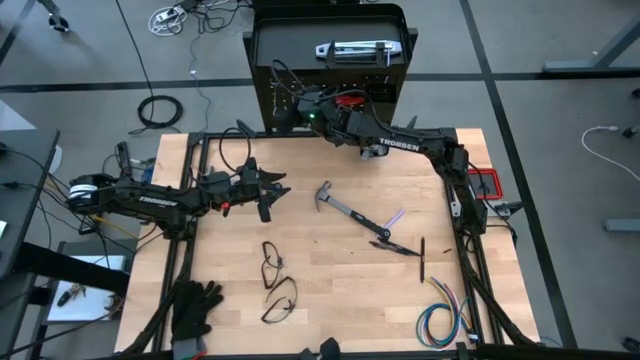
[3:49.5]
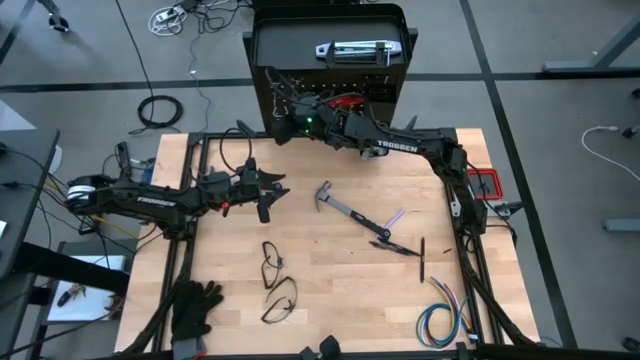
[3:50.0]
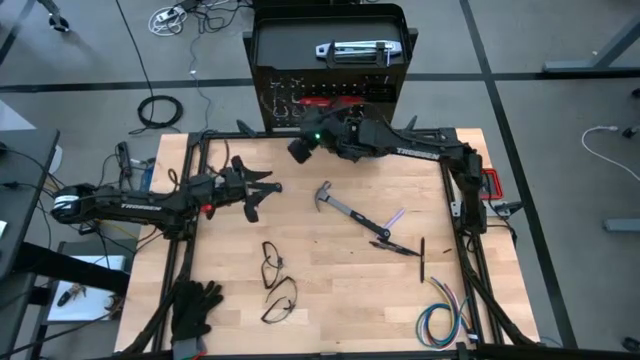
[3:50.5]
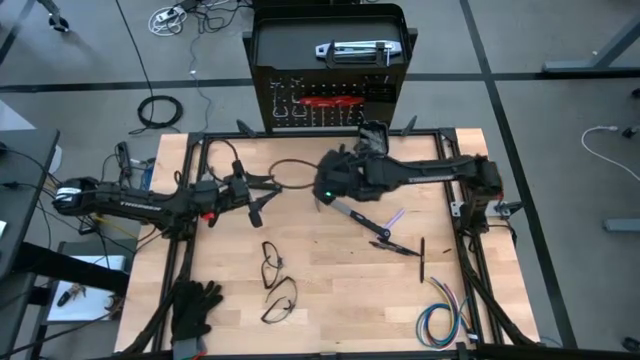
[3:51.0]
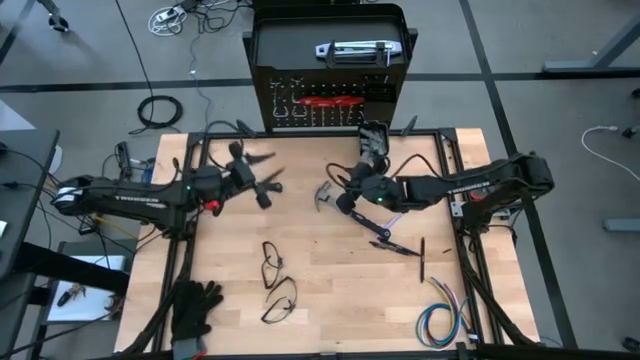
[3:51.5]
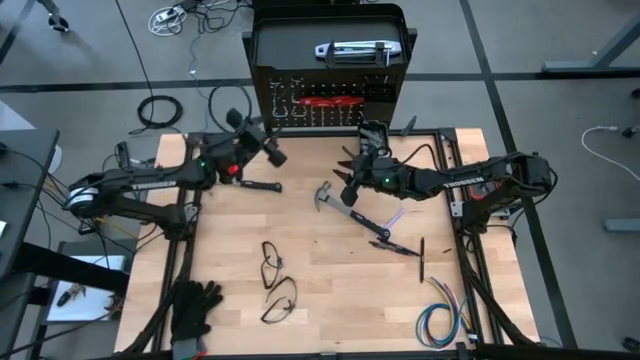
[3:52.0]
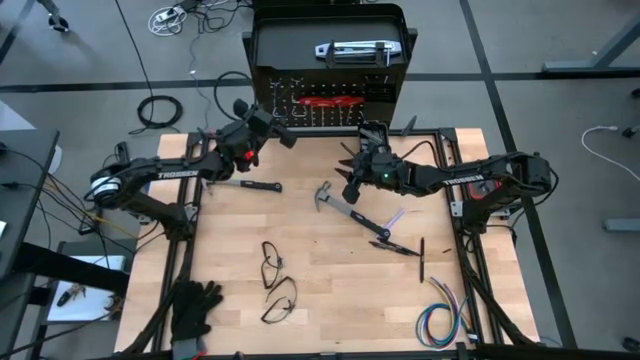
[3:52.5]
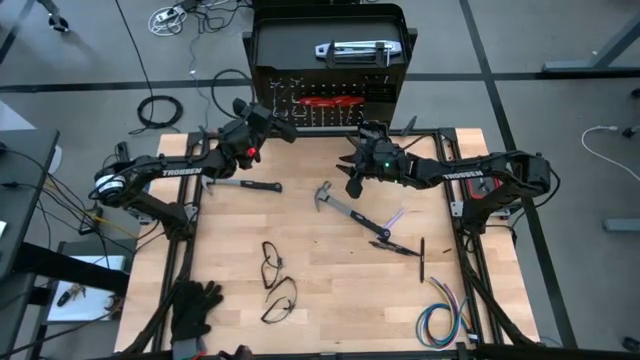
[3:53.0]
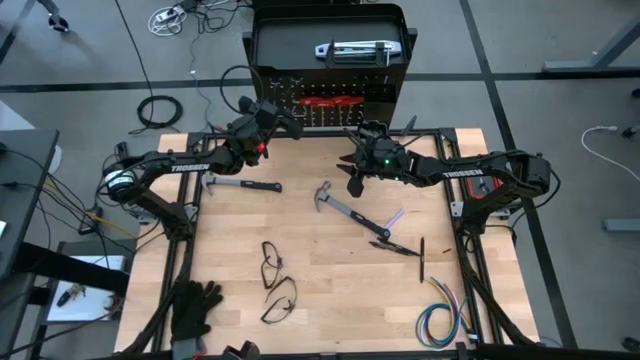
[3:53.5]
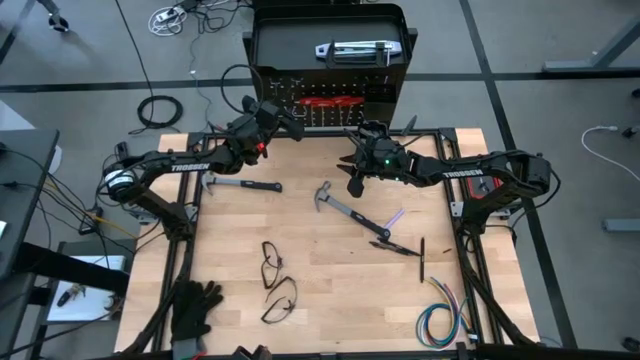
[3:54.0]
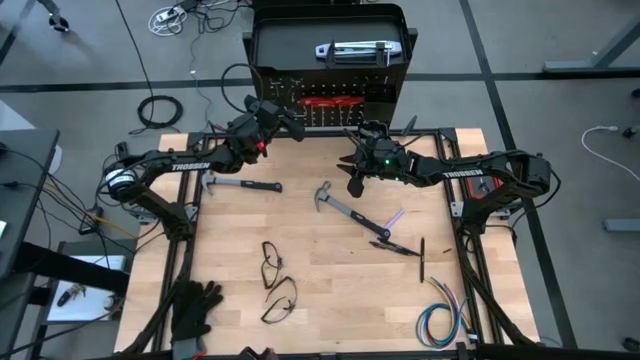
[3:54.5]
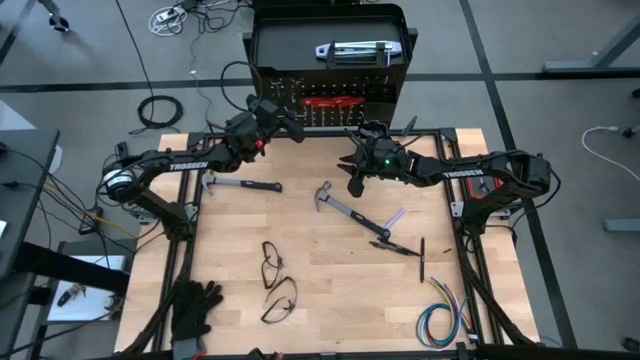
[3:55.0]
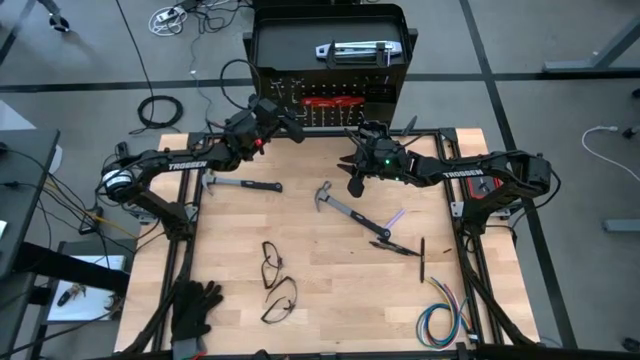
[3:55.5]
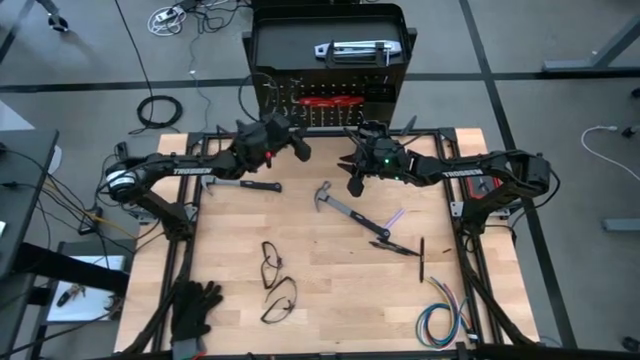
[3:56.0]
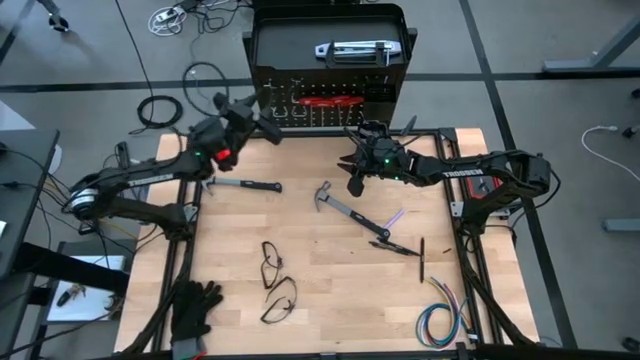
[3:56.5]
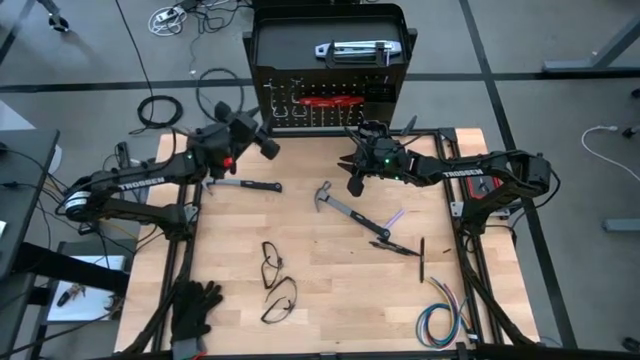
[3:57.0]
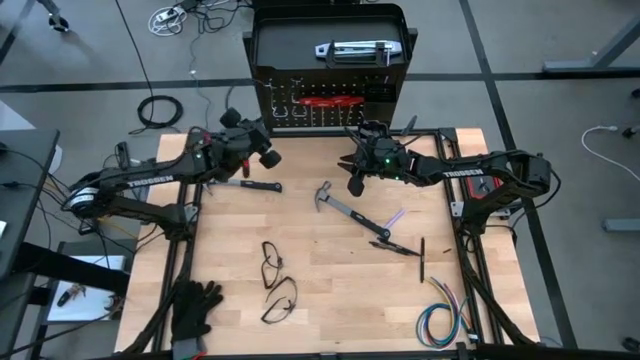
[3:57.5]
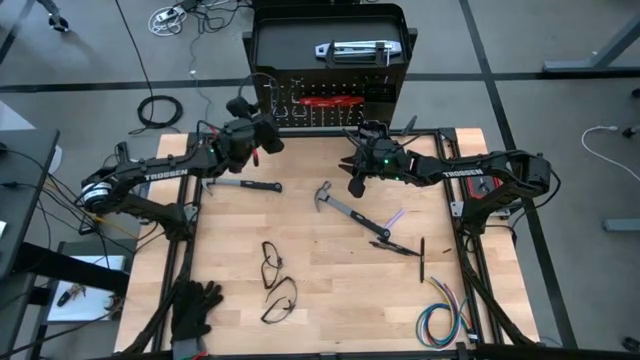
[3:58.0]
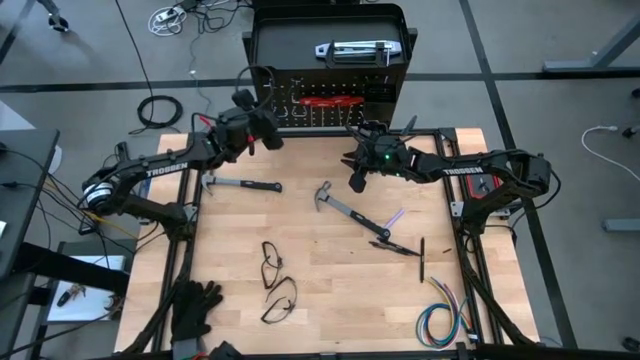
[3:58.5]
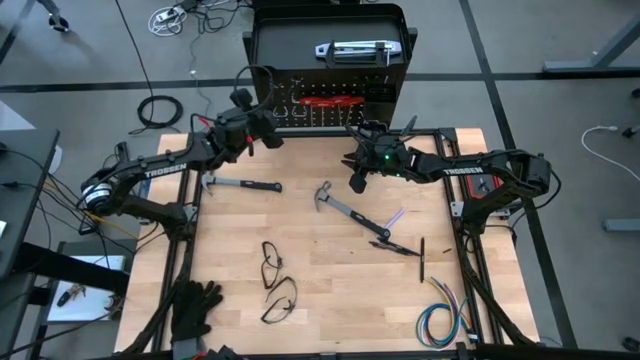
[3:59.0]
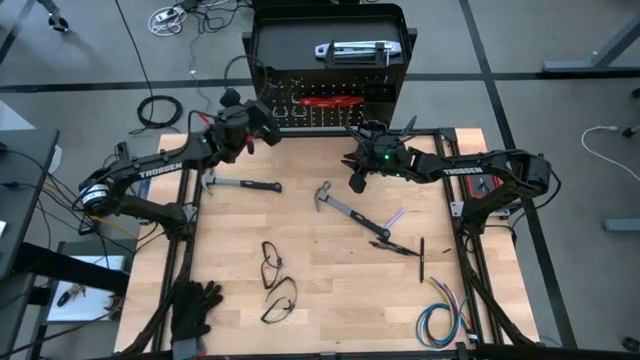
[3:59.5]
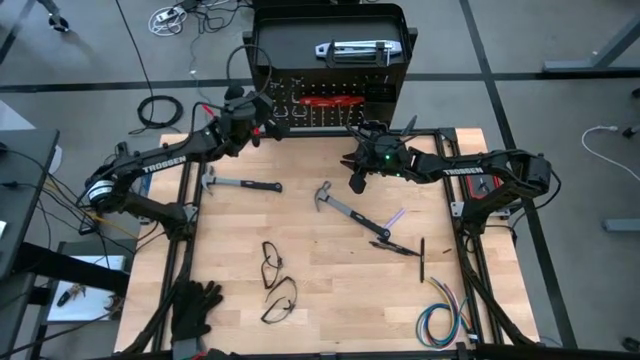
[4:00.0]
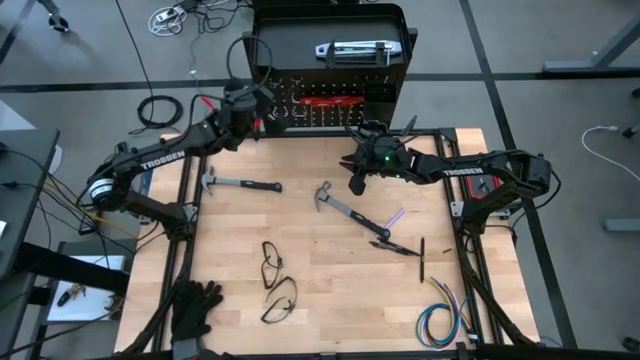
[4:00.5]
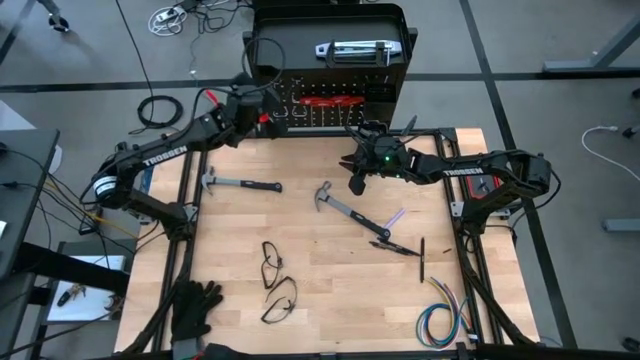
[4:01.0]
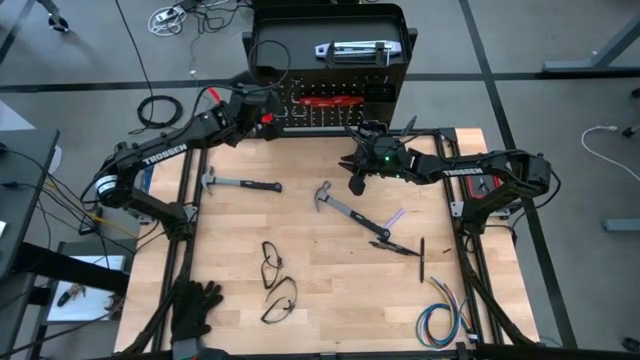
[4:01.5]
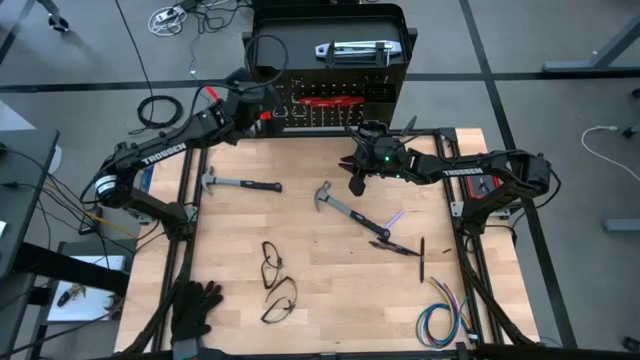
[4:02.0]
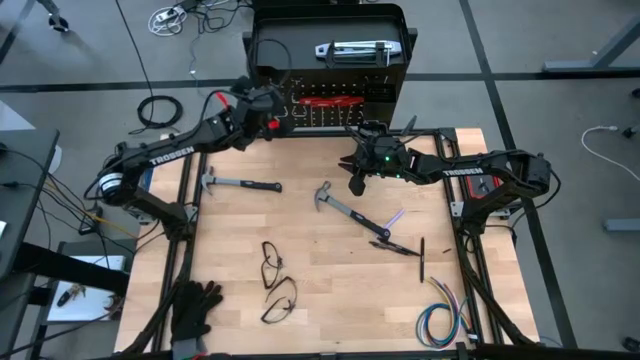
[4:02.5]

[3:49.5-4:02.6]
Task: Hang tools onto peg board
Adjust the top left hook

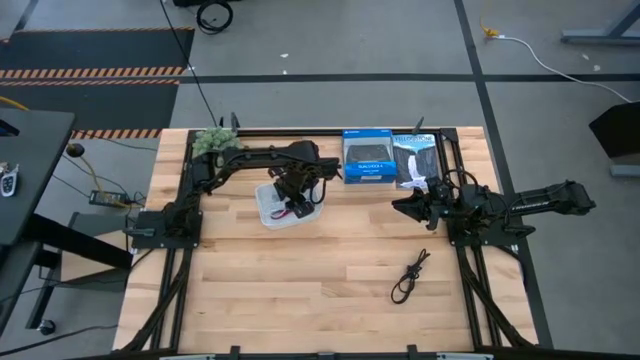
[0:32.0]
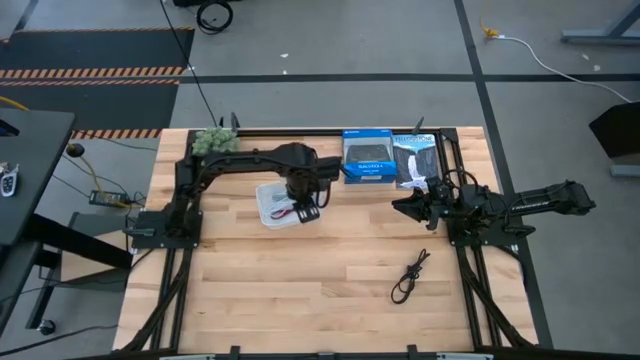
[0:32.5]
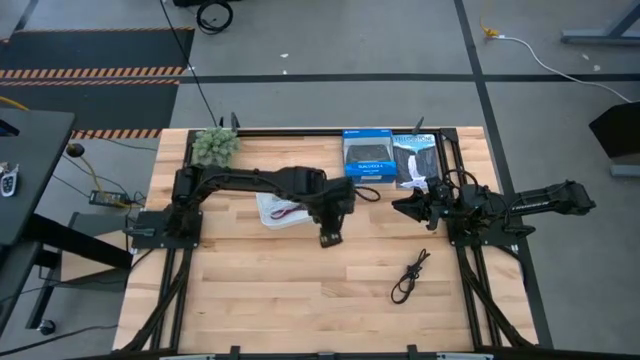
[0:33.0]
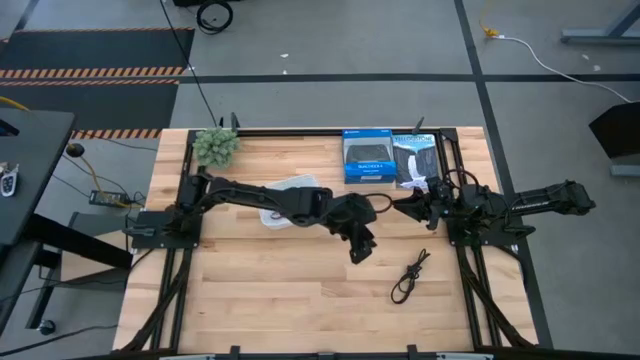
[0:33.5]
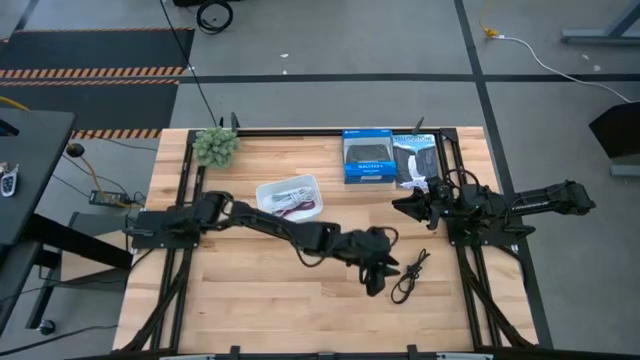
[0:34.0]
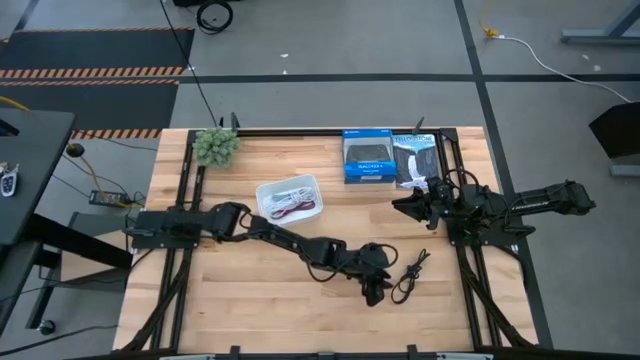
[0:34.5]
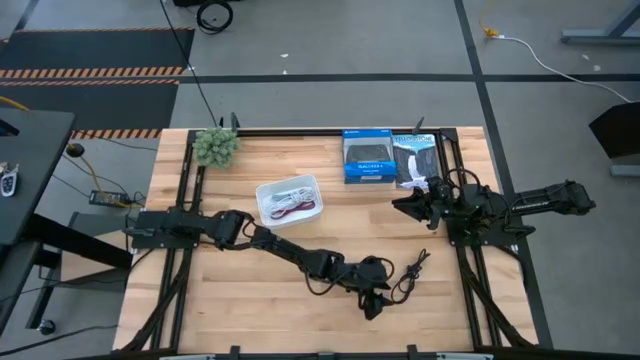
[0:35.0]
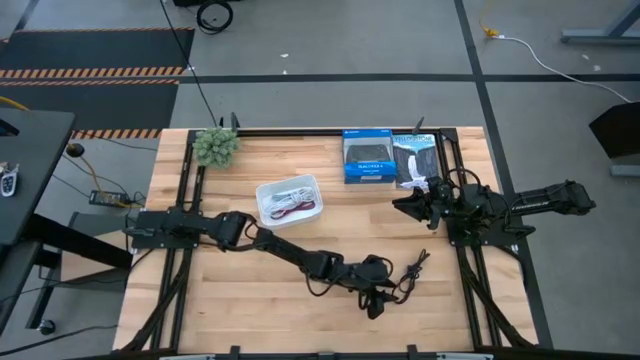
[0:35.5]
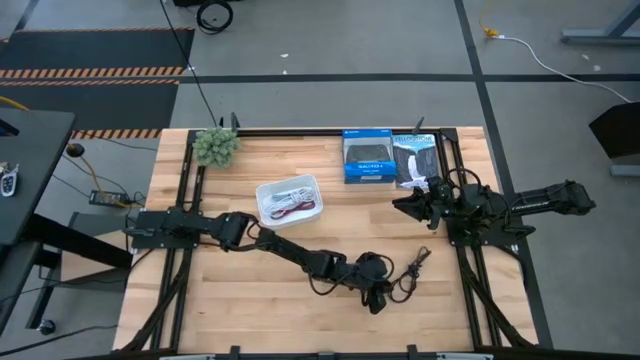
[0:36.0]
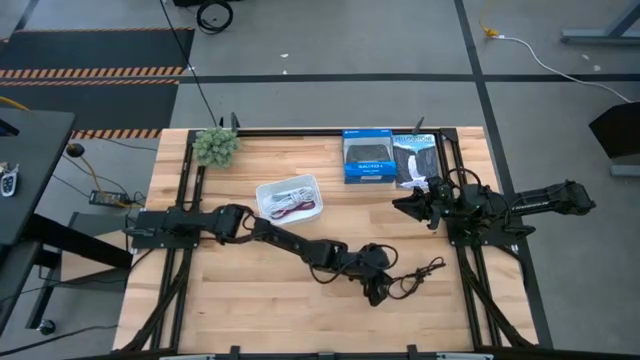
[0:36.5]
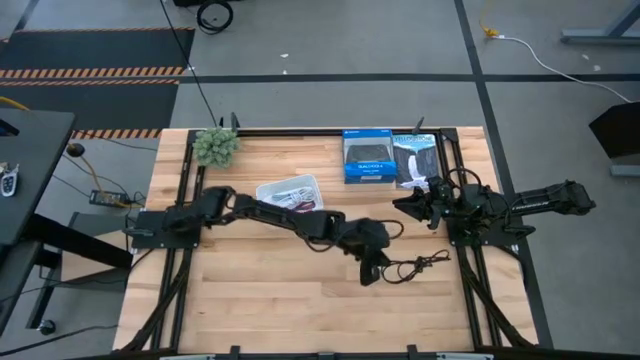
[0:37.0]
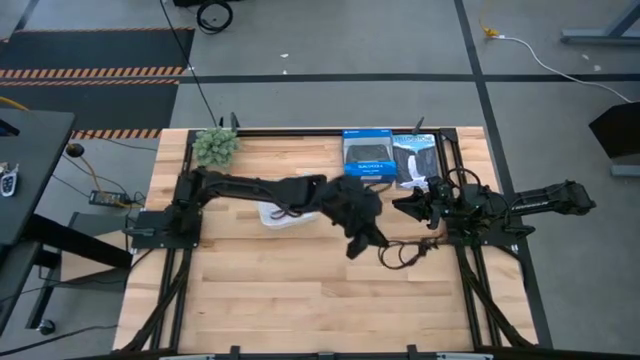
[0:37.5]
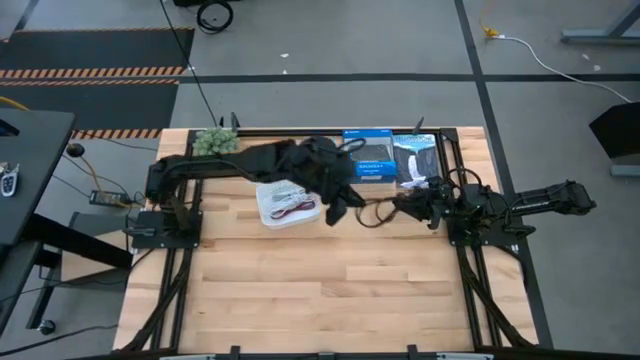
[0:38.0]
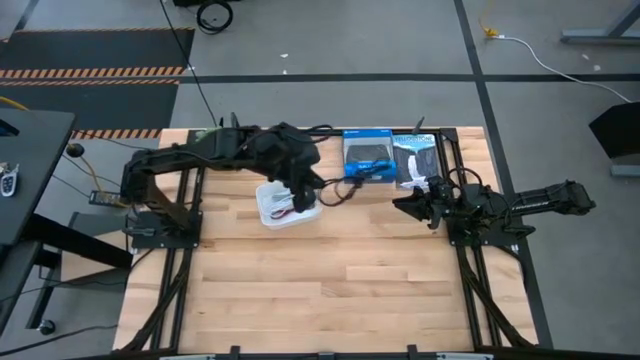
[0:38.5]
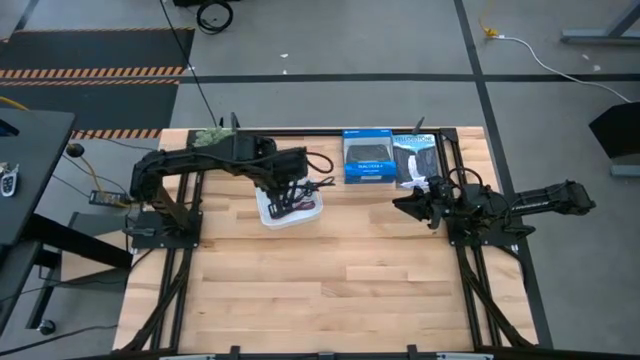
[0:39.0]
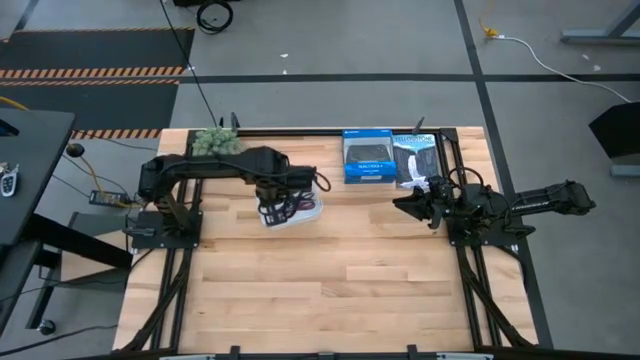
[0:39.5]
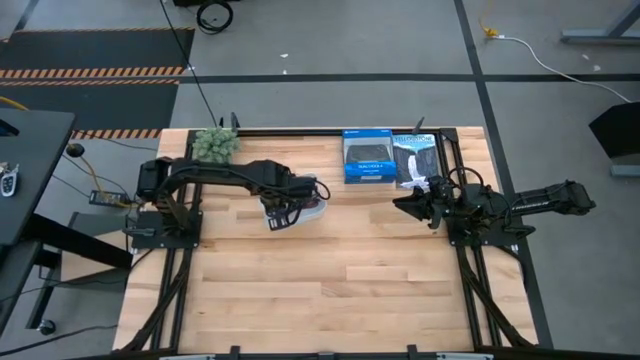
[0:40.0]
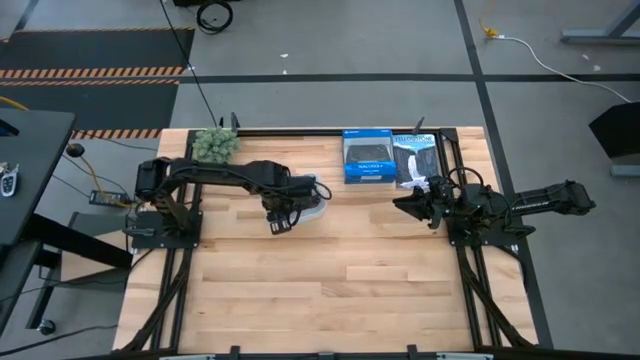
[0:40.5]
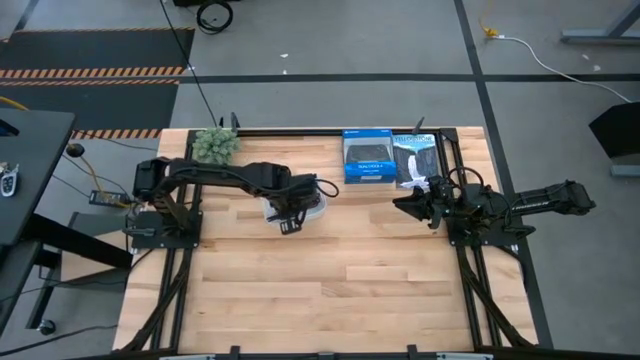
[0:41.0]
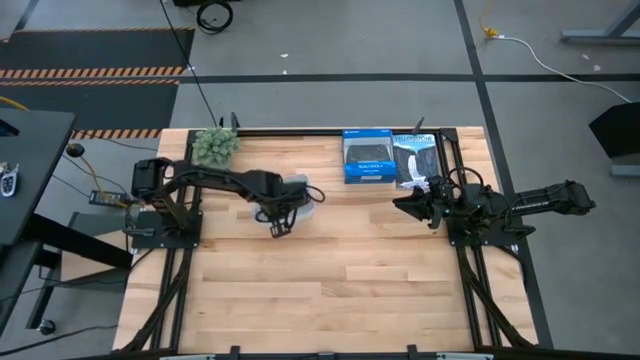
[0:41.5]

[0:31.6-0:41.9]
Task: Pick and place USB-C Cables
Put the black cable charger into the white bin
